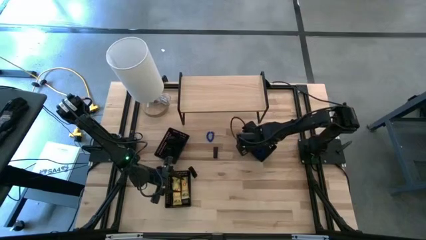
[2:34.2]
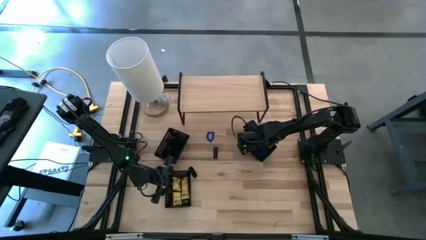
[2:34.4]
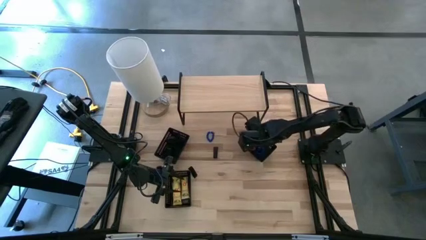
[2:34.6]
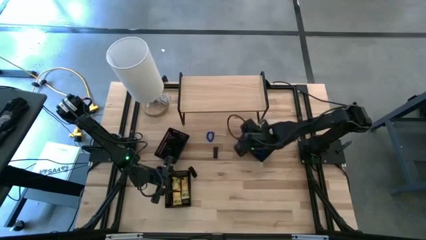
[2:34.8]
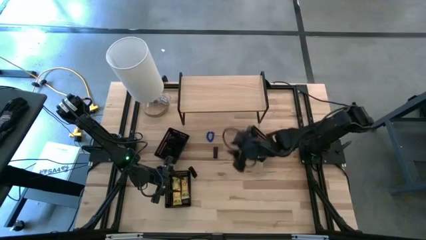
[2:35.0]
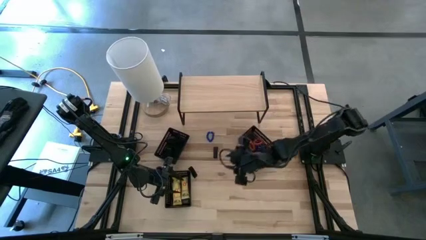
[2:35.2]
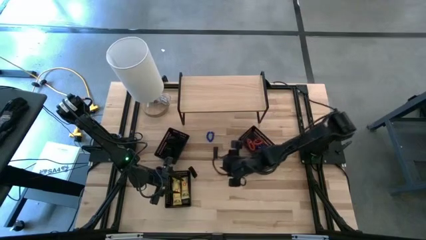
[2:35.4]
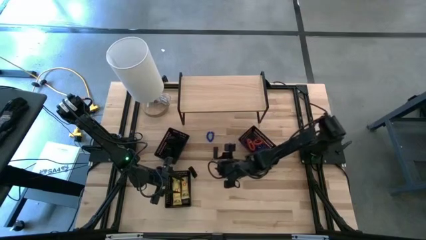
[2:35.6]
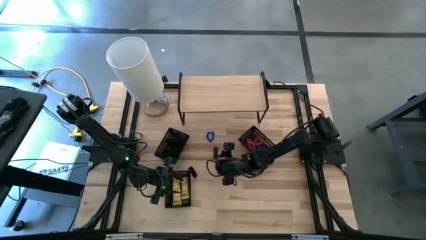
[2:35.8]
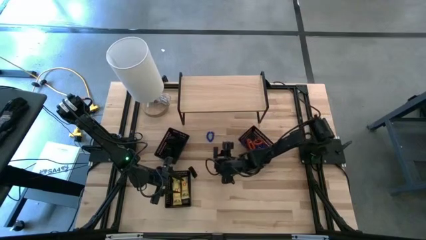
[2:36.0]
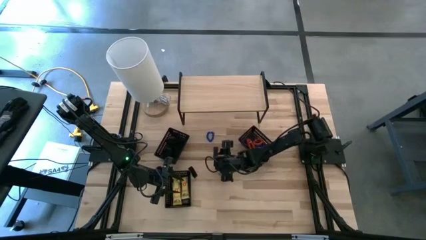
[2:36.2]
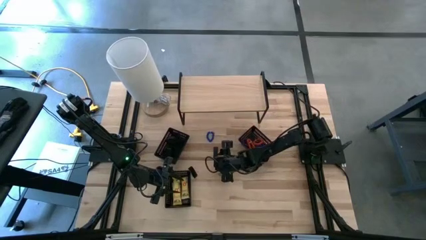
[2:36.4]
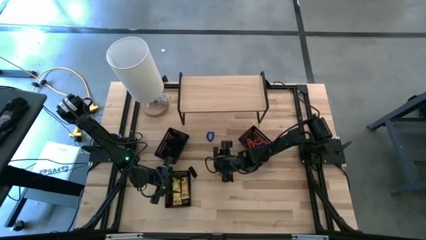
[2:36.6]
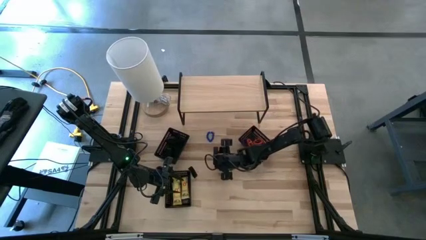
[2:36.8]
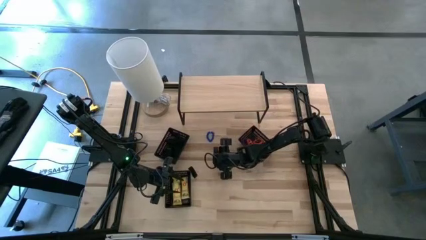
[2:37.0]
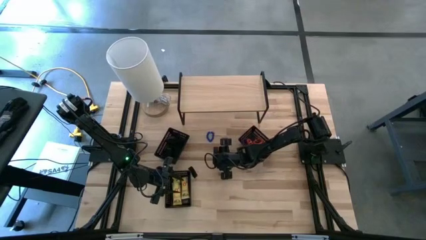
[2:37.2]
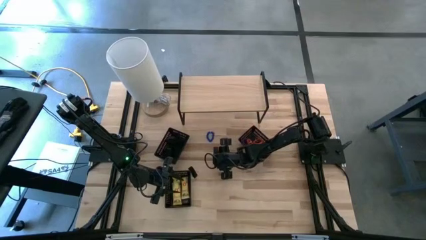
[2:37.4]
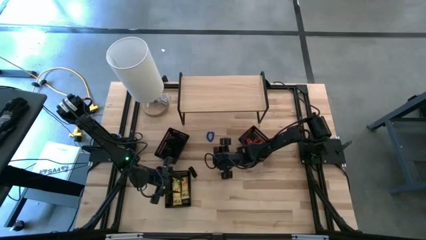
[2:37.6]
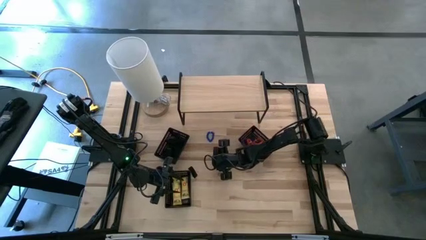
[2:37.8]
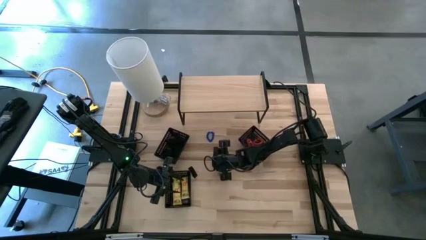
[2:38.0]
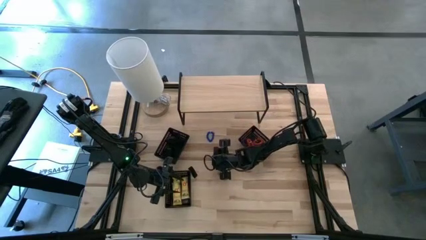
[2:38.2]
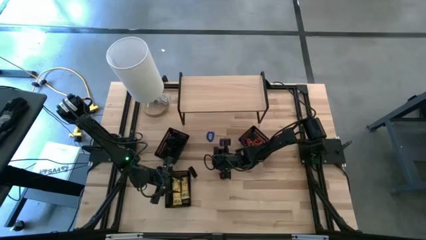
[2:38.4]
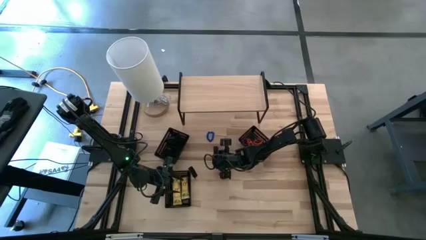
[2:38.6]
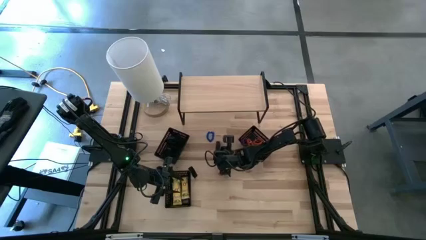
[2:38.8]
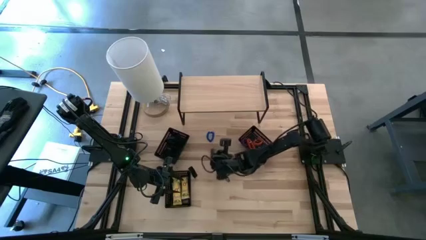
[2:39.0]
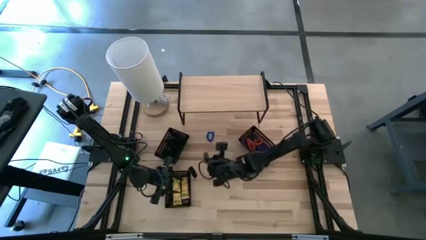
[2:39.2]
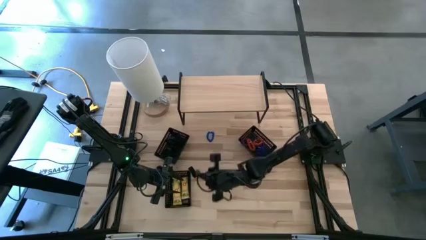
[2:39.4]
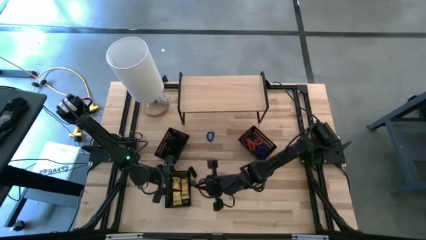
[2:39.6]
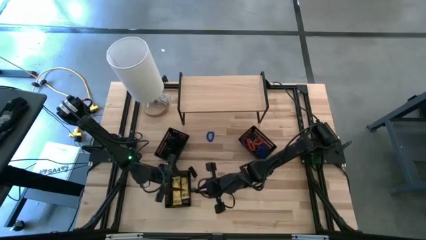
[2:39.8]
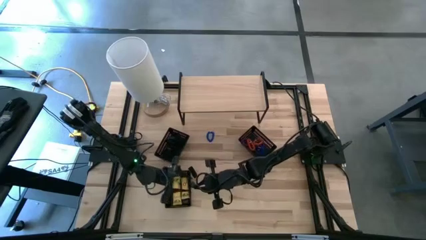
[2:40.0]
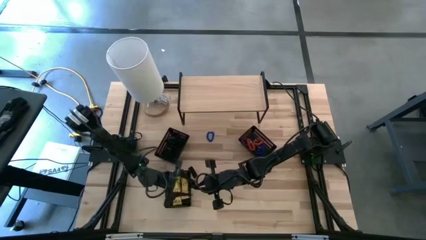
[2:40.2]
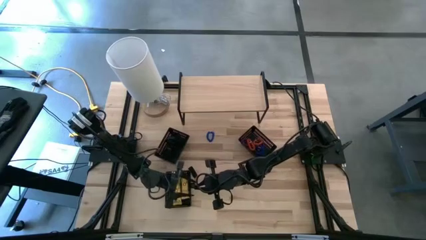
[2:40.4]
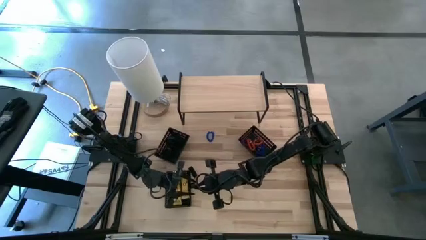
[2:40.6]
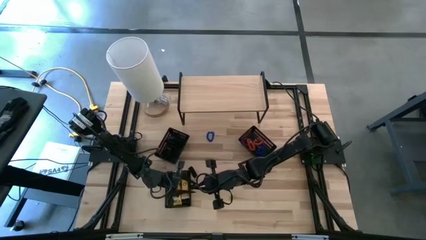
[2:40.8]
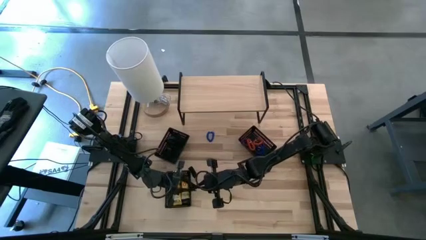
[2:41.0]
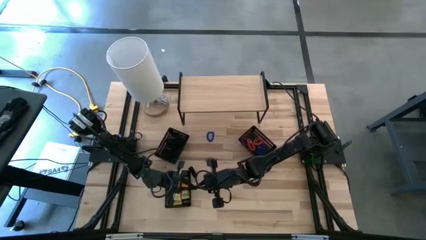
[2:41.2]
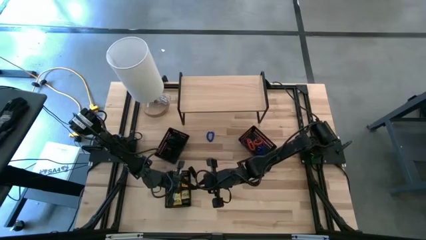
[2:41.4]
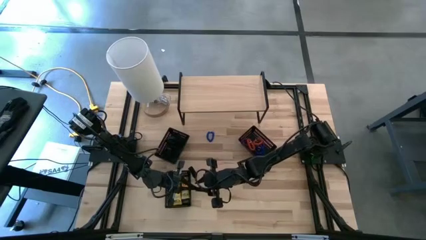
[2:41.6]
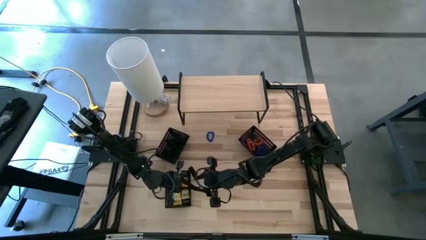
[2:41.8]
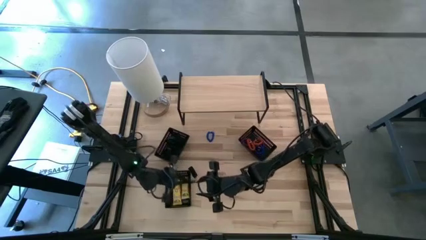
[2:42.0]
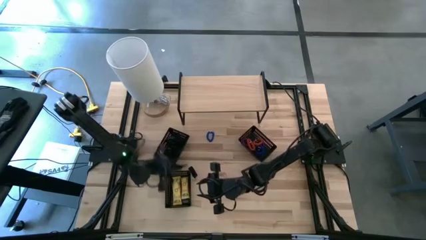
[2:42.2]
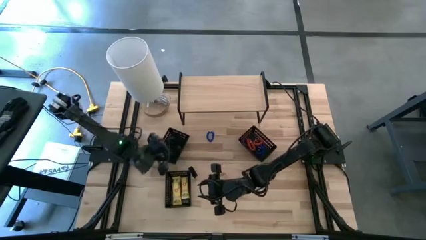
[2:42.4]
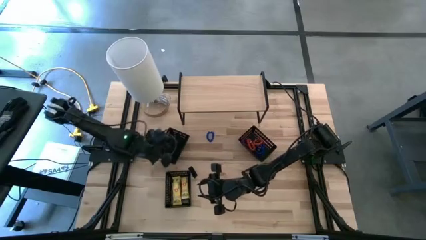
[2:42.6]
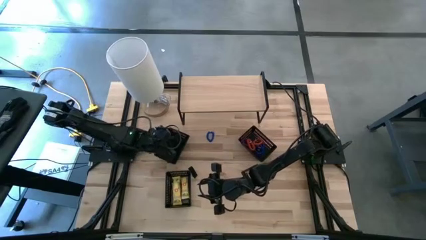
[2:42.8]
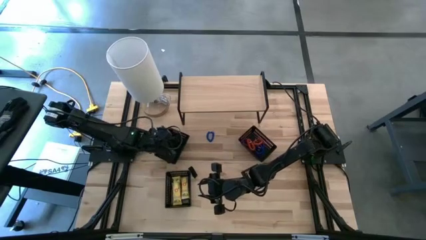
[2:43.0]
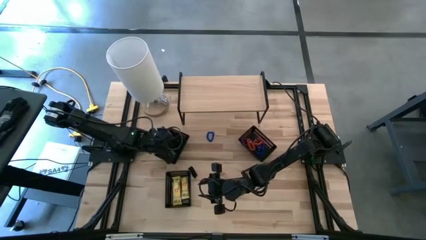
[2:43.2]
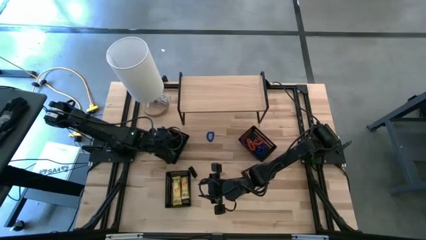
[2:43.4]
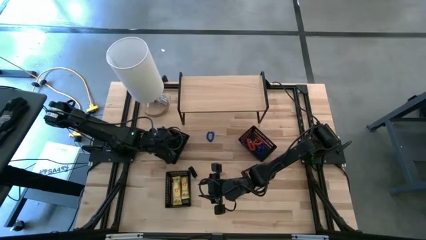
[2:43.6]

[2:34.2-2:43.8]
Task: Pick & Place Office Desk Supplies
Put the top black rubber band into the top left black bin

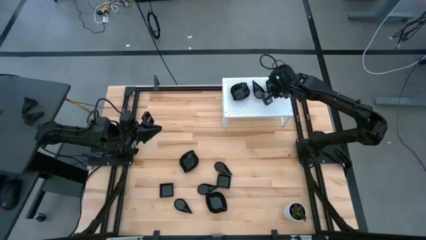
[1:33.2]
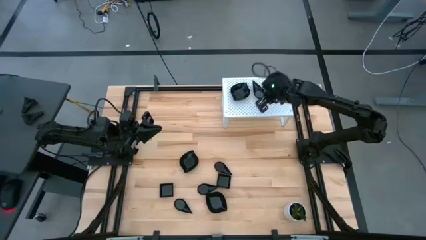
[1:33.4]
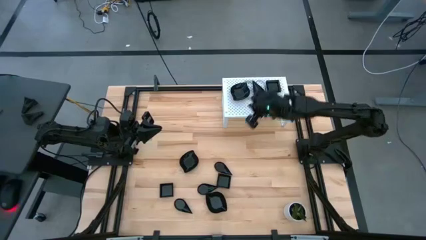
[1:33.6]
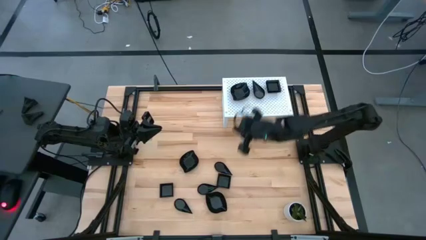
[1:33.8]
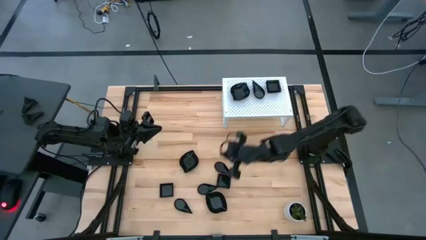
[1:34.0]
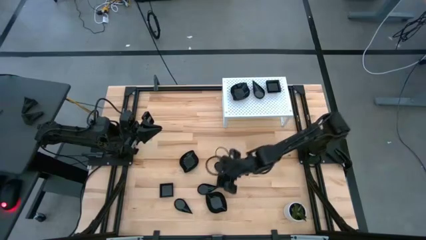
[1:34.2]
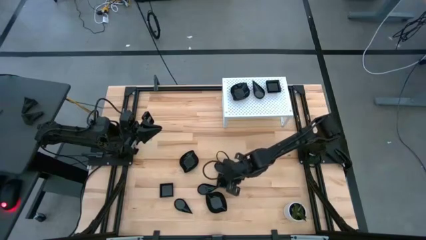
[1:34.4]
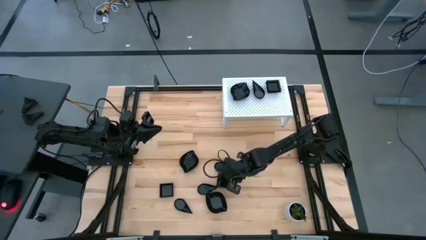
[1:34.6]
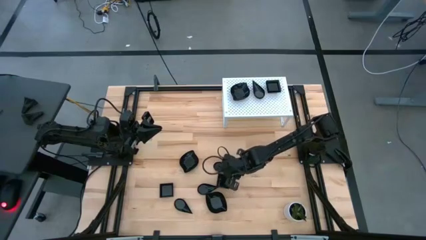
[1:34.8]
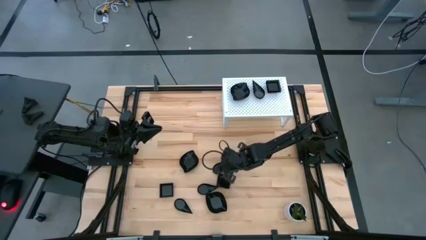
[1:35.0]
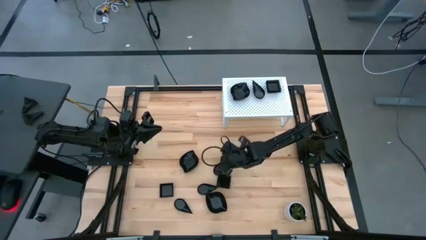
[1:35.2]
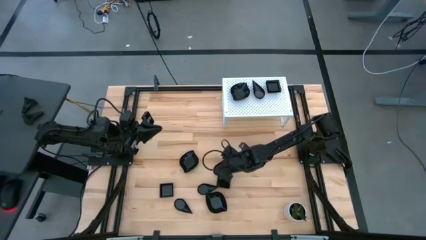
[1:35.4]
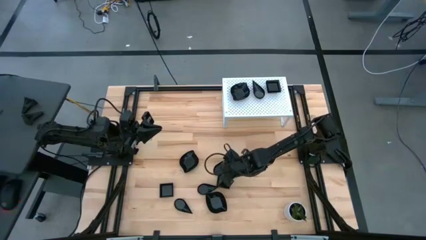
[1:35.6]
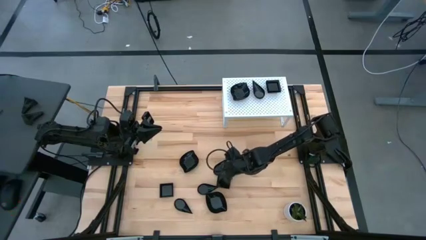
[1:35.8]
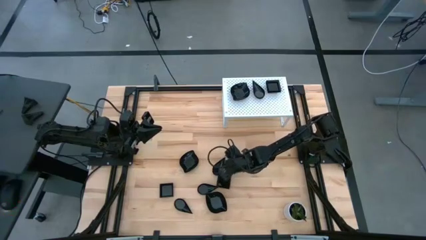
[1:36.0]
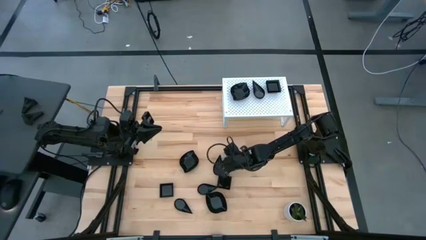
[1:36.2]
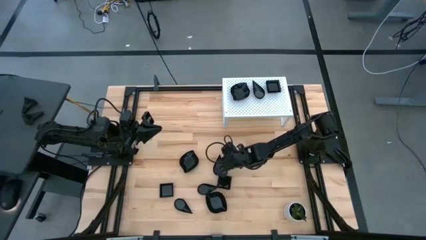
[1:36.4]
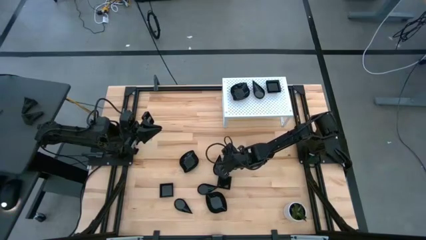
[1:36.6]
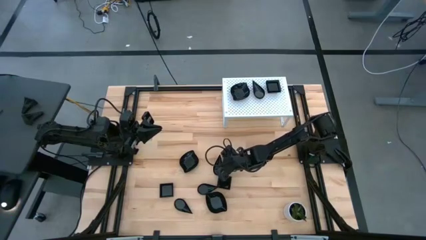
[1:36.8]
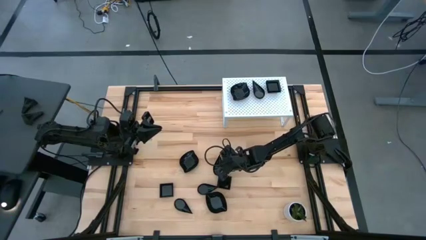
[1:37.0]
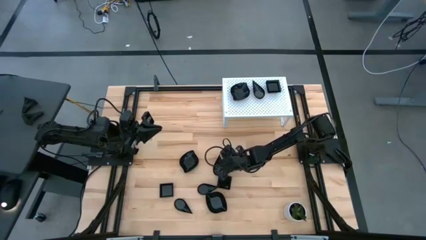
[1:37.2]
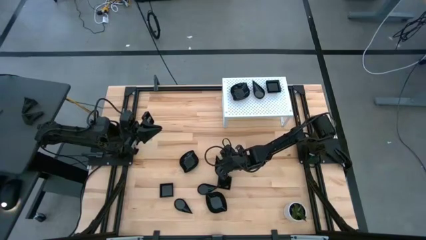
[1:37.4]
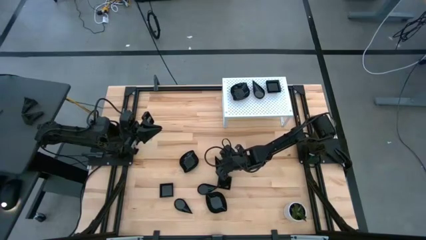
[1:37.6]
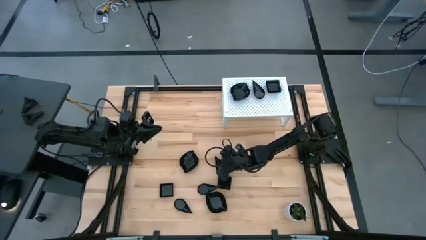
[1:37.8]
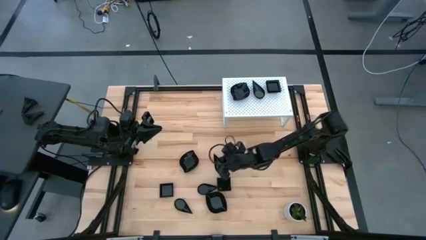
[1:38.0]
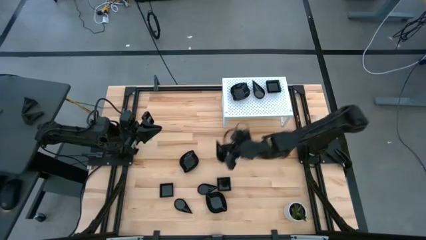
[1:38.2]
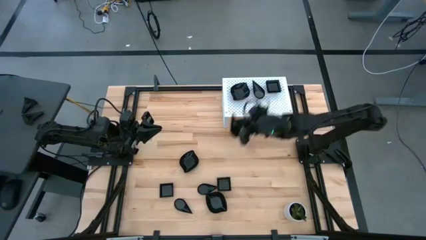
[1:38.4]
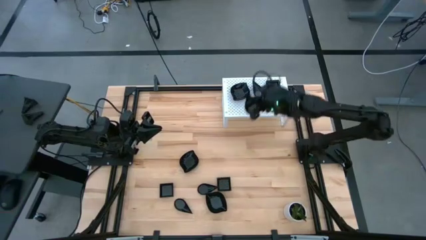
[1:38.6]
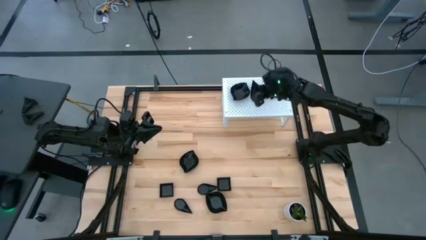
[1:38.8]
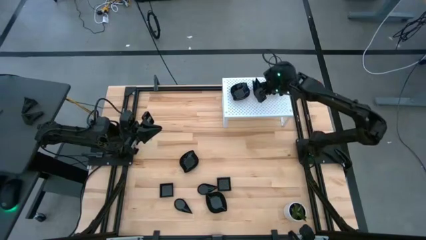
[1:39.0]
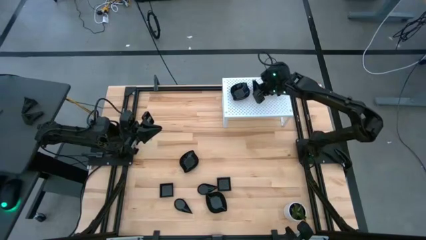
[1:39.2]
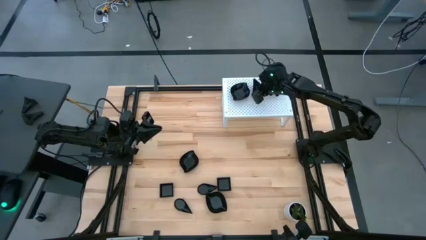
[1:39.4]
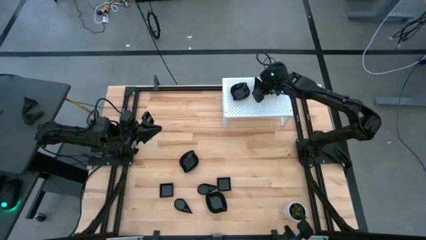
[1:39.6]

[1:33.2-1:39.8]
Task: Pick & Place Mini shaped plates
Stack the drop shaped plate on top of the drop shaped plates on the shelf
